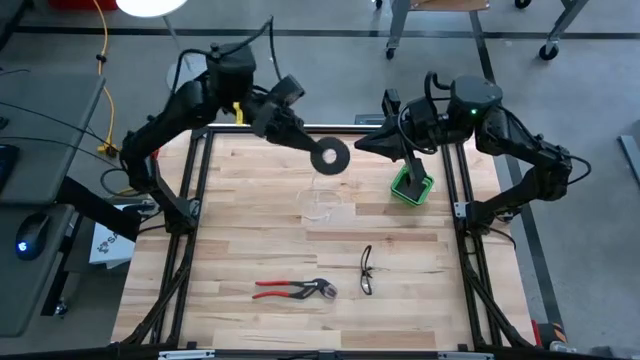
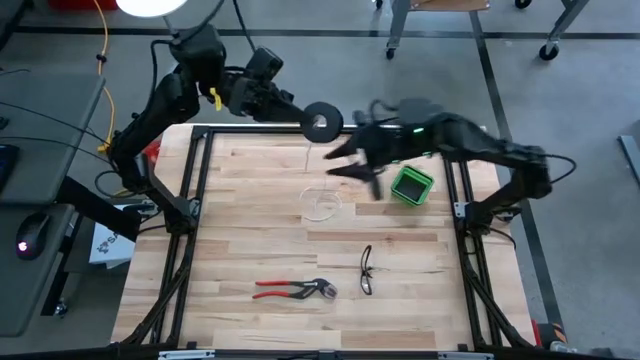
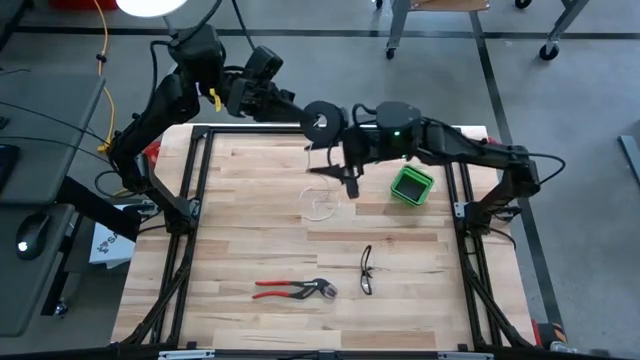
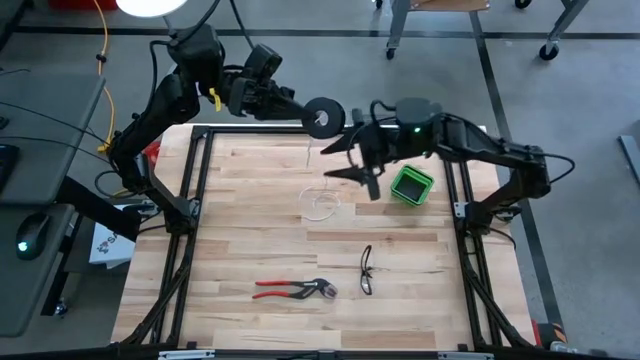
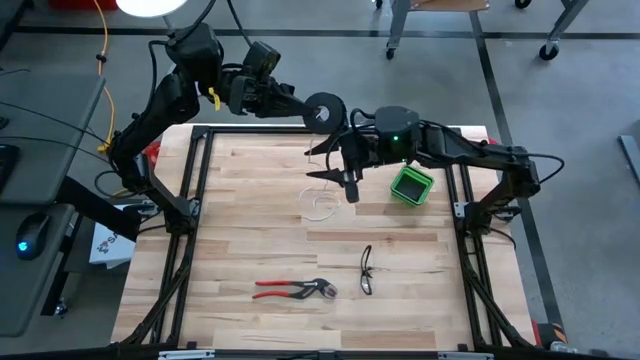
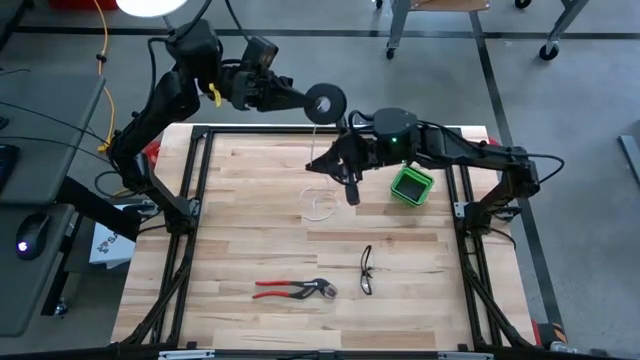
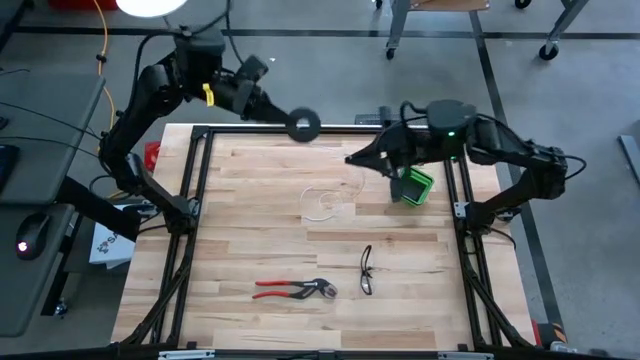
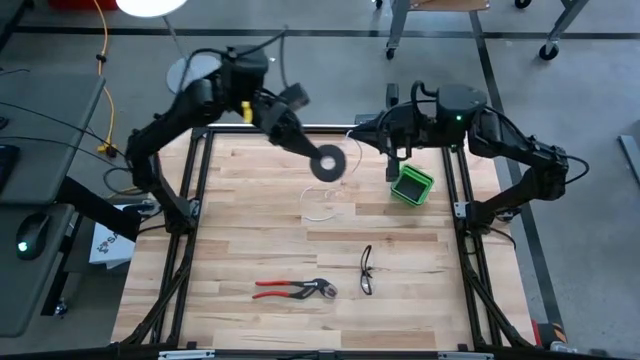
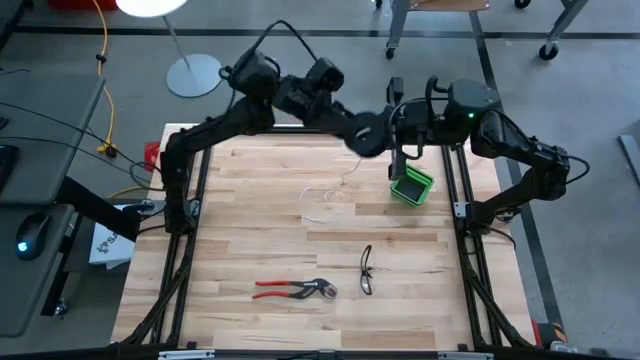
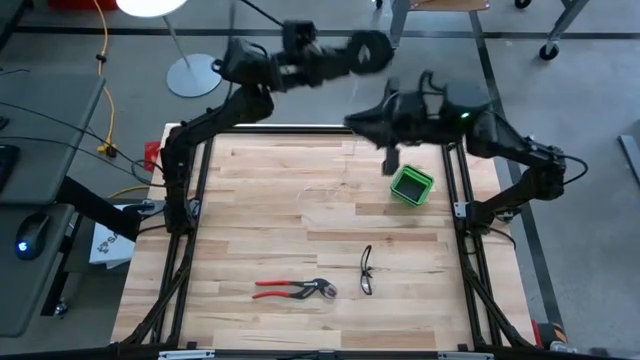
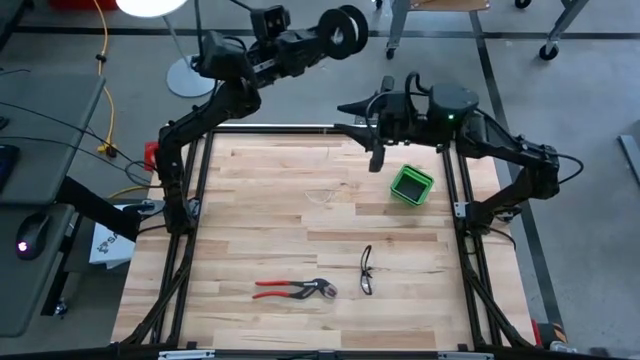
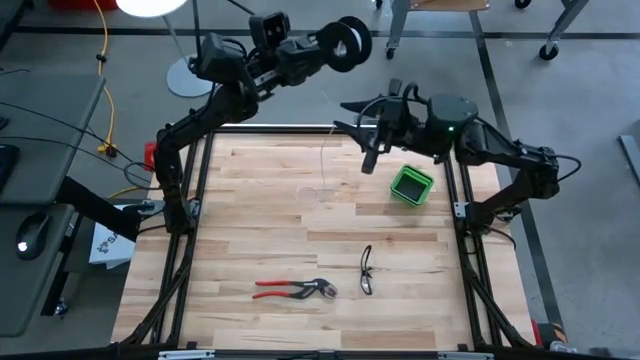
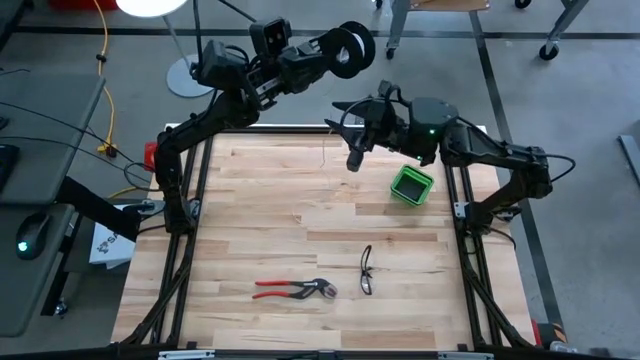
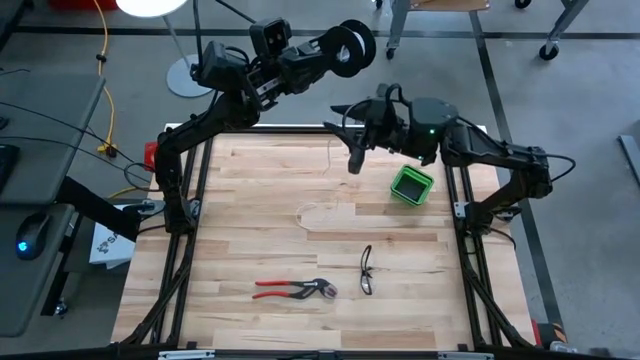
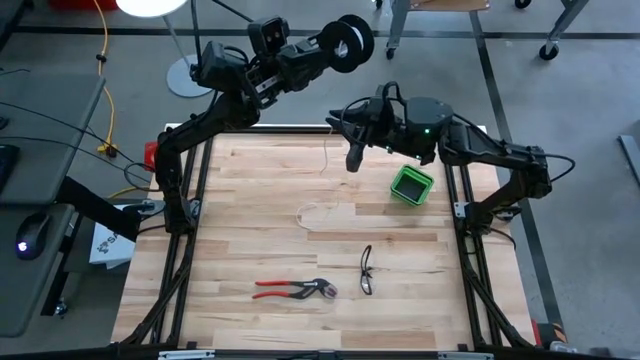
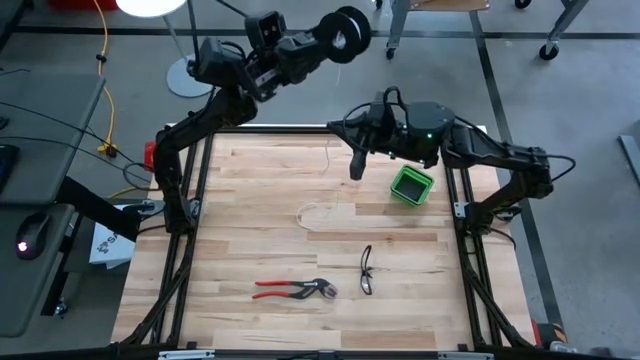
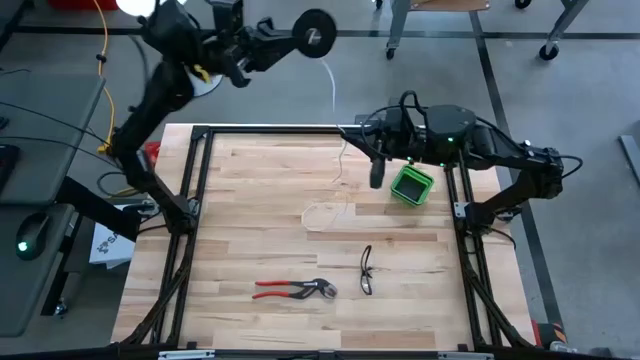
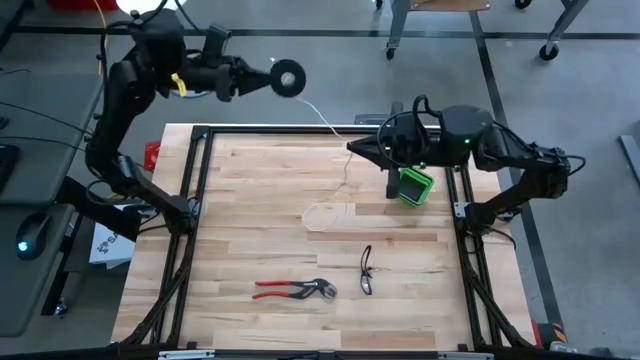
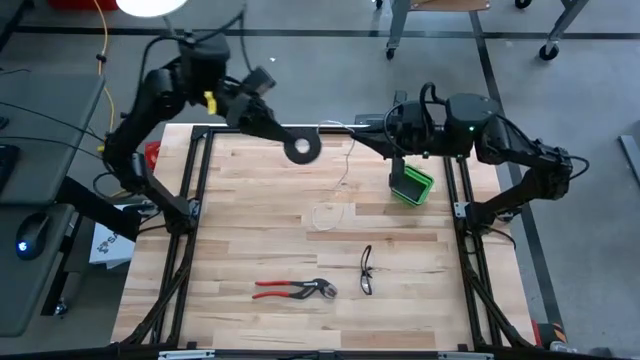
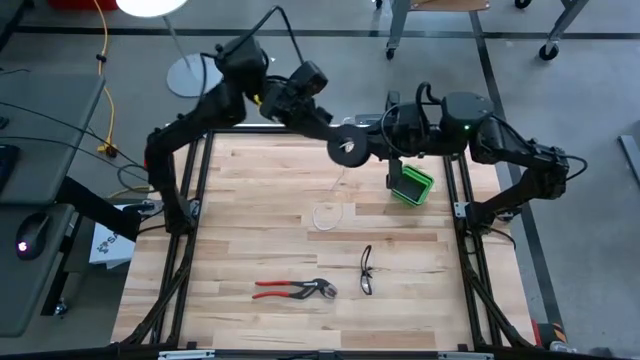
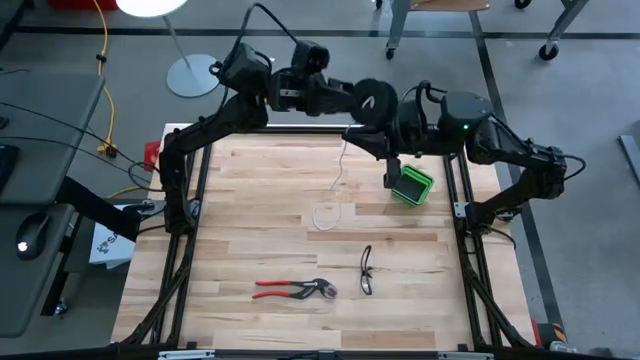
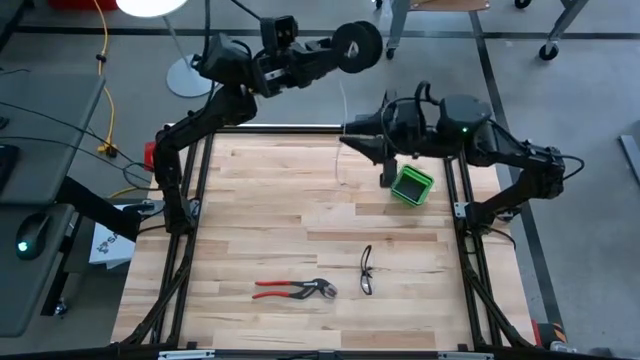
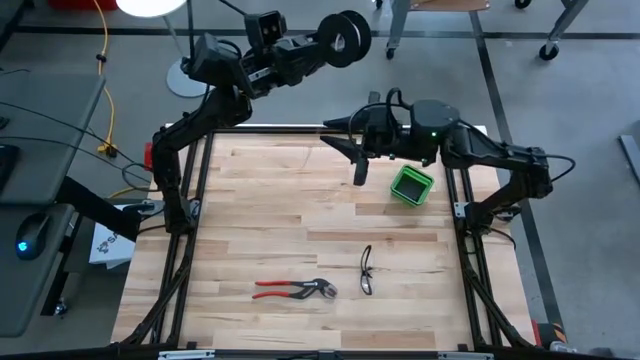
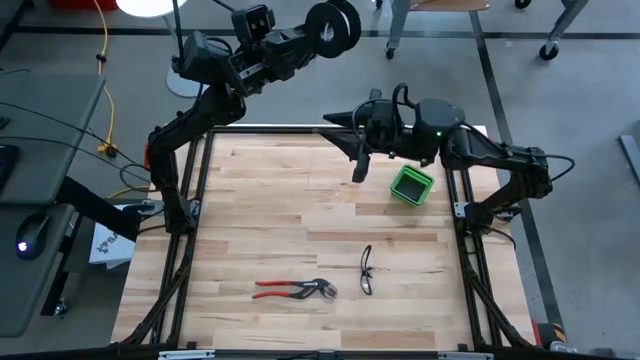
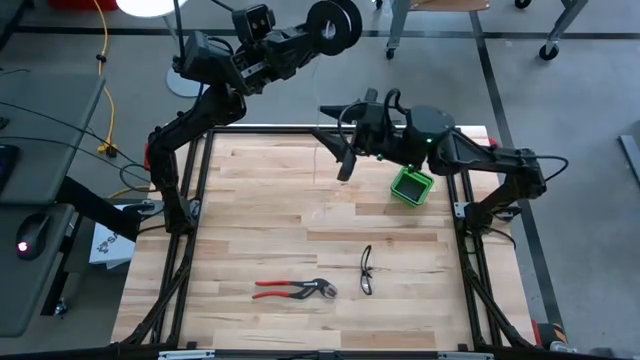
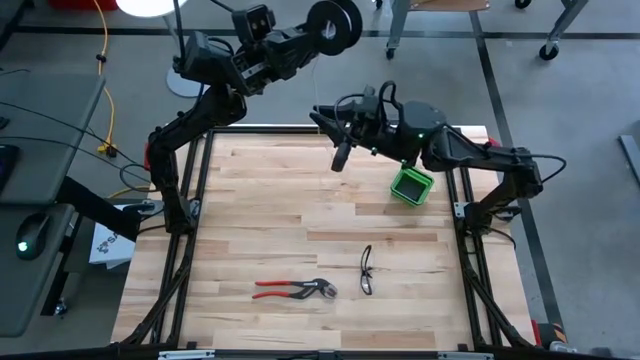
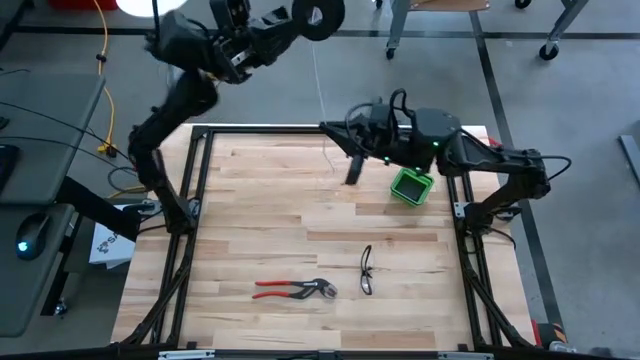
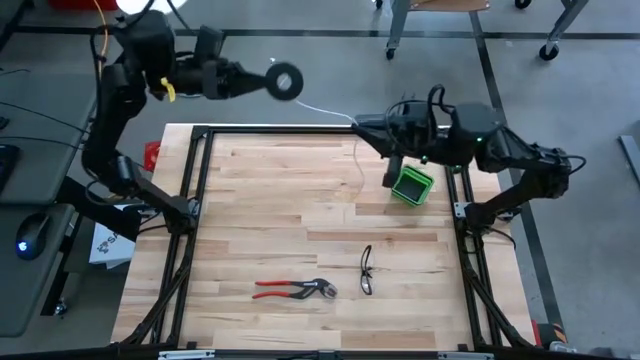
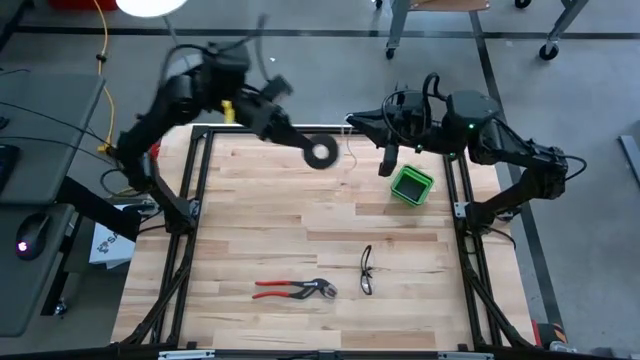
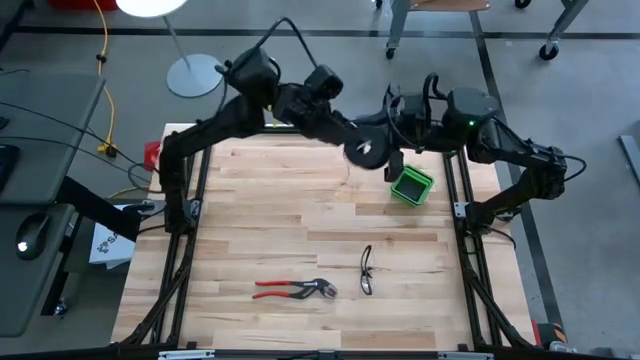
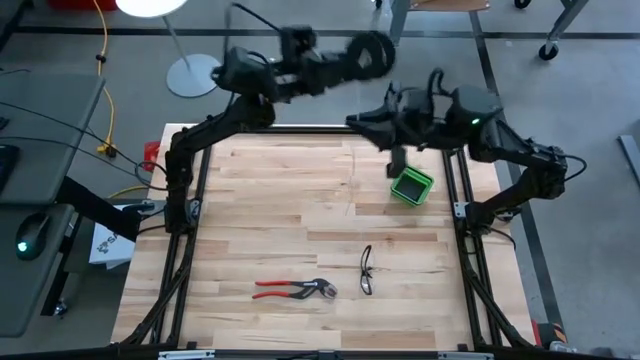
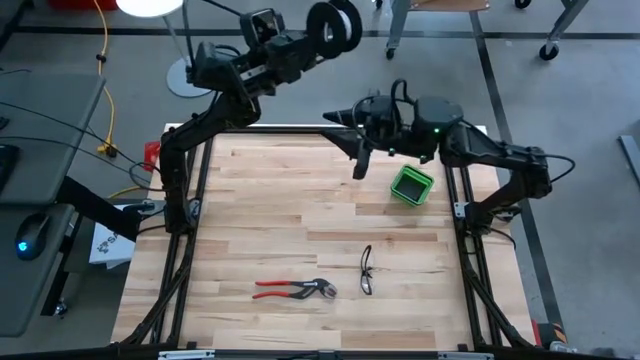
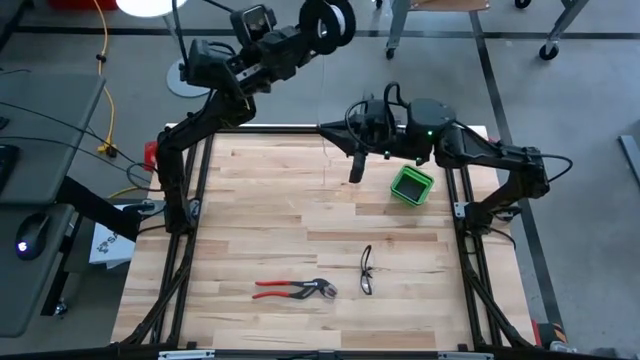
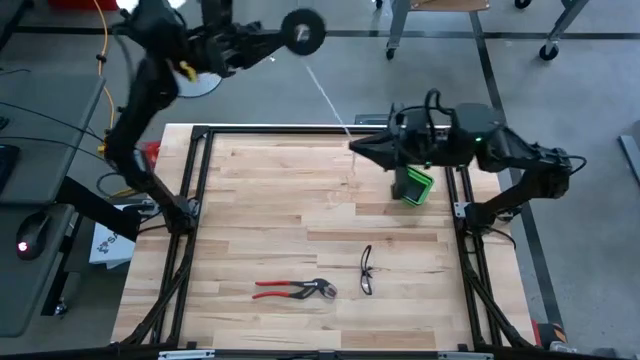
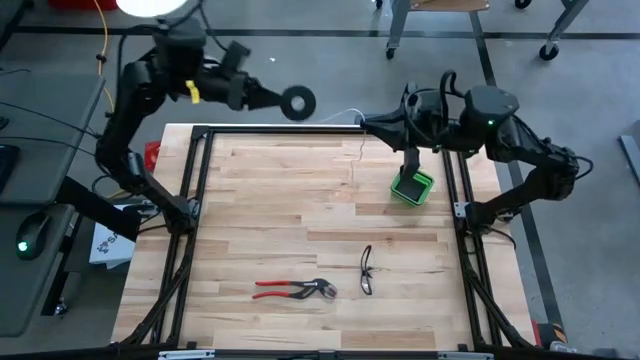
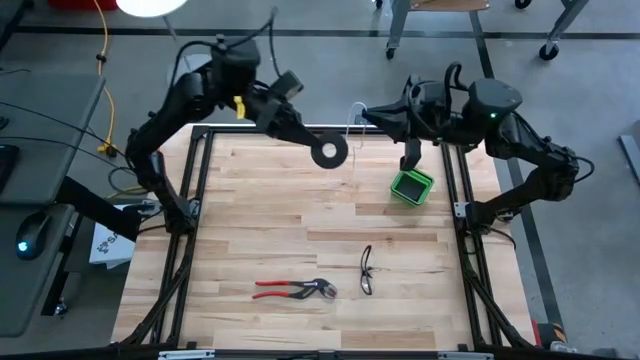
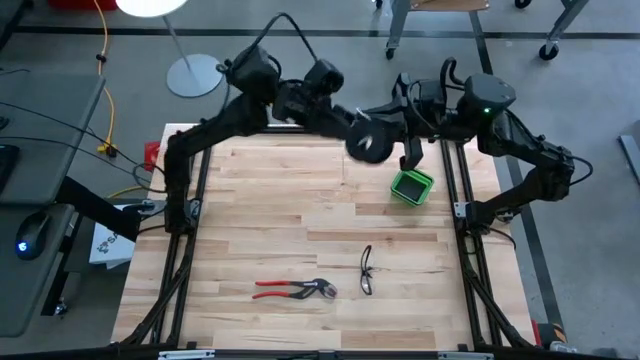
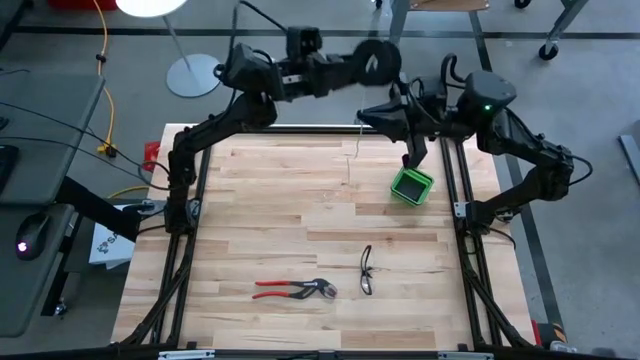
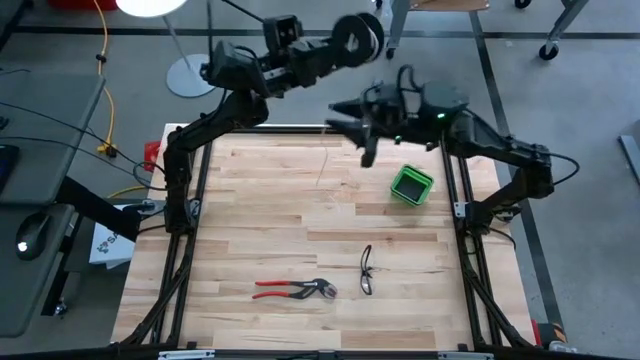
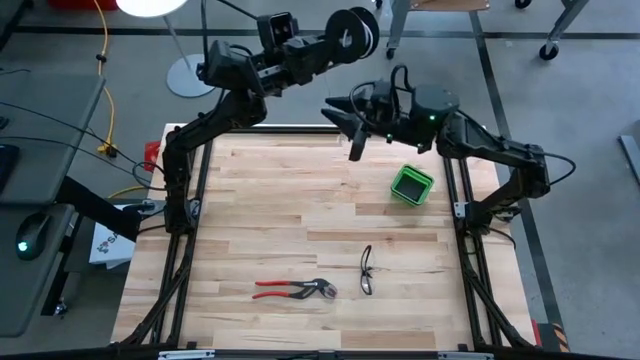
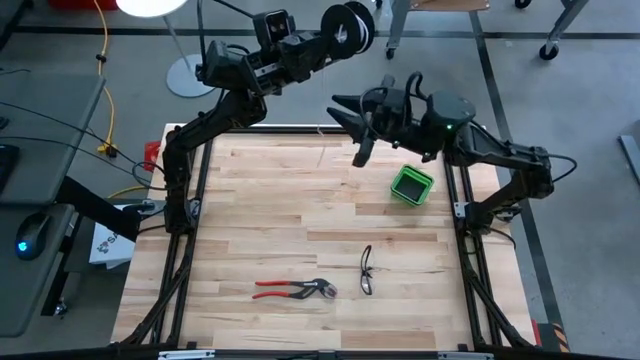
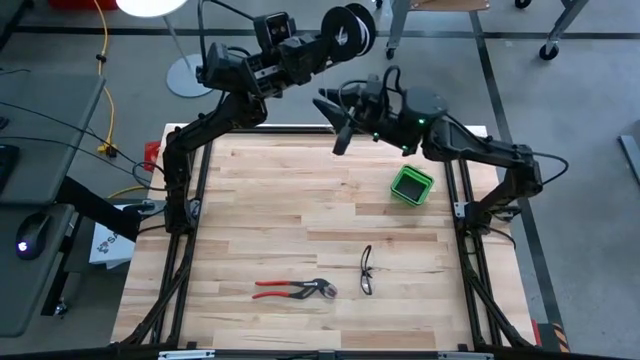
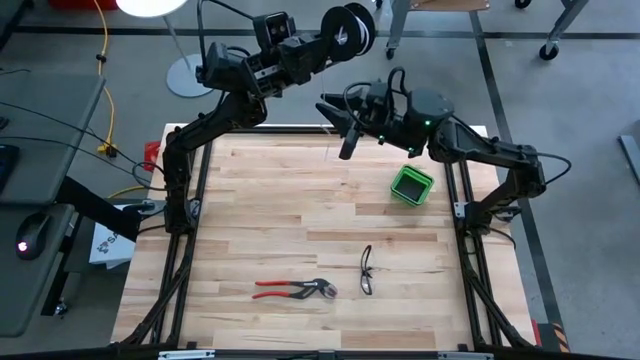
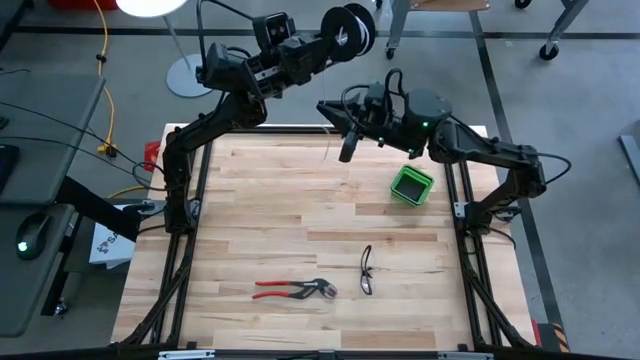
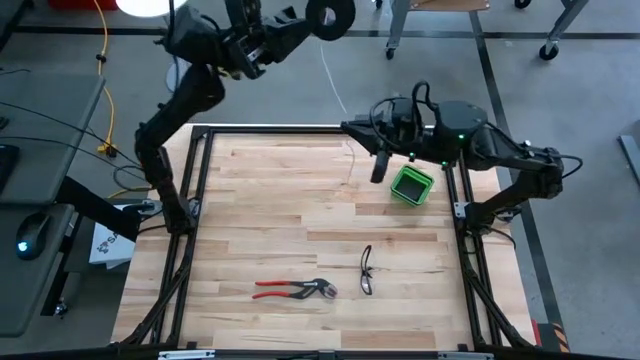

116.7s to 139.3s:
Task: Coil cords
Coil the wire into the spool
